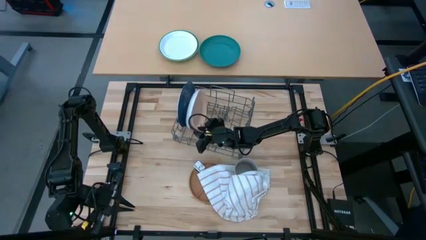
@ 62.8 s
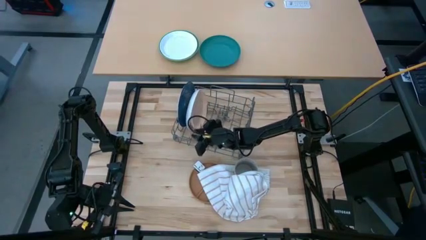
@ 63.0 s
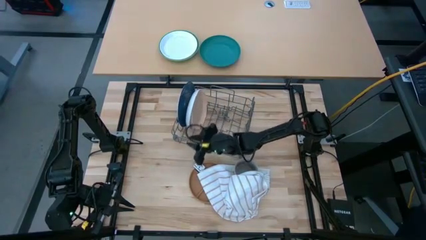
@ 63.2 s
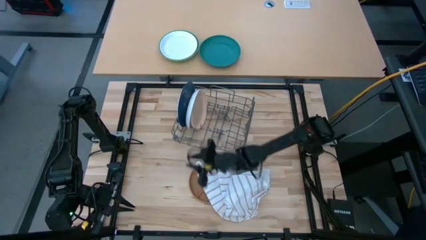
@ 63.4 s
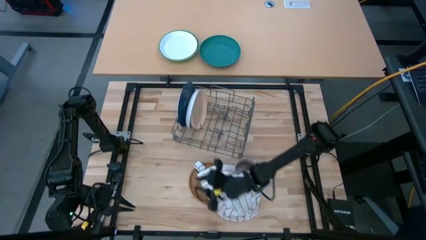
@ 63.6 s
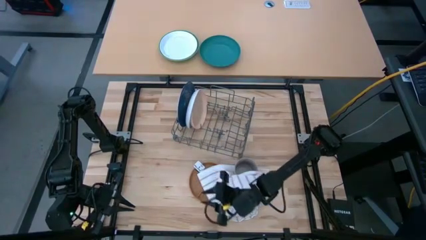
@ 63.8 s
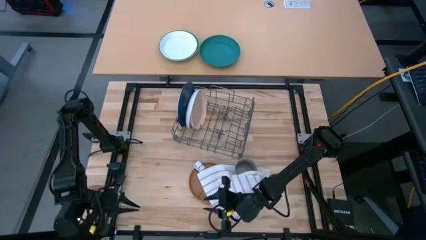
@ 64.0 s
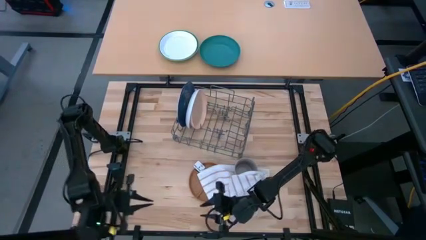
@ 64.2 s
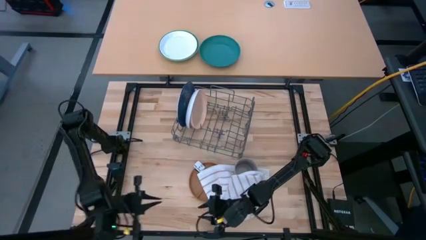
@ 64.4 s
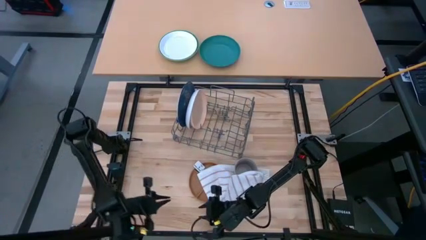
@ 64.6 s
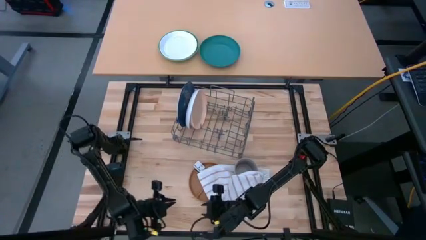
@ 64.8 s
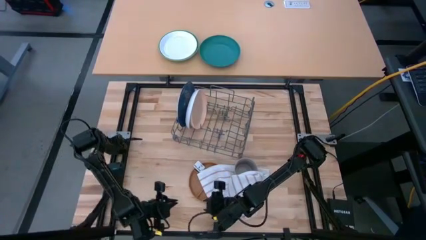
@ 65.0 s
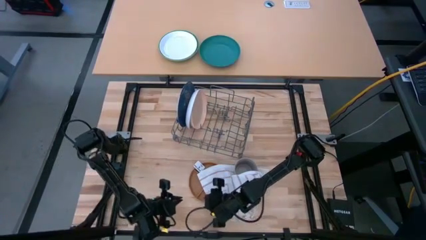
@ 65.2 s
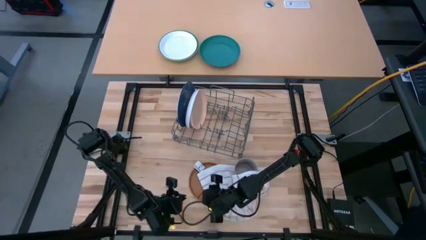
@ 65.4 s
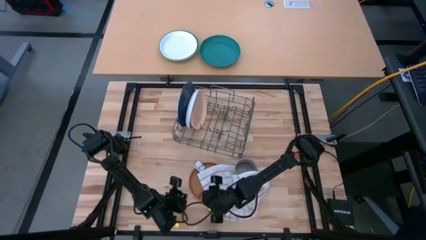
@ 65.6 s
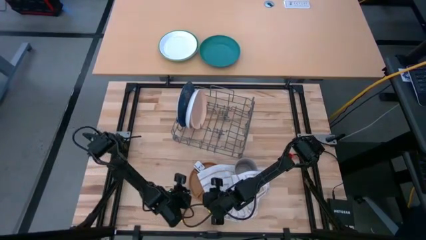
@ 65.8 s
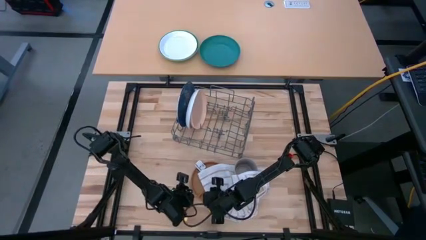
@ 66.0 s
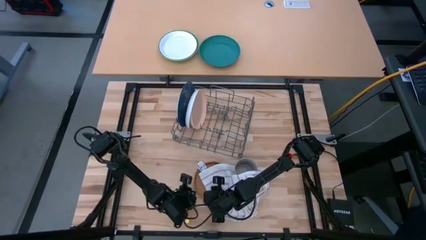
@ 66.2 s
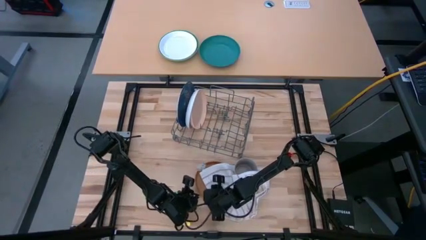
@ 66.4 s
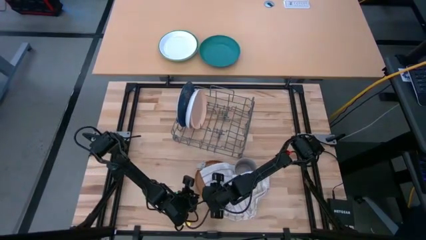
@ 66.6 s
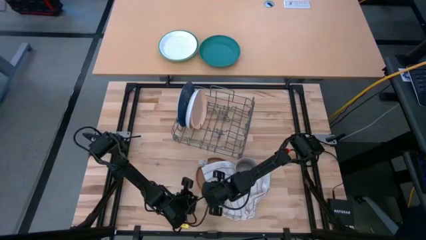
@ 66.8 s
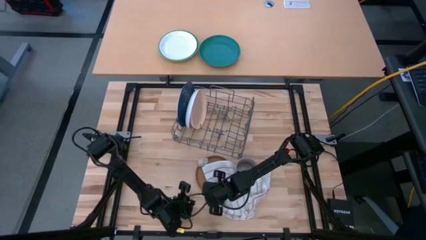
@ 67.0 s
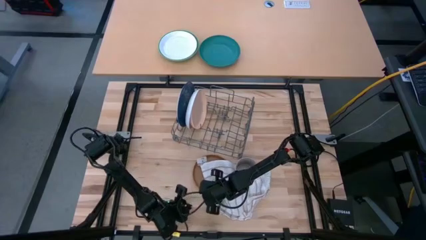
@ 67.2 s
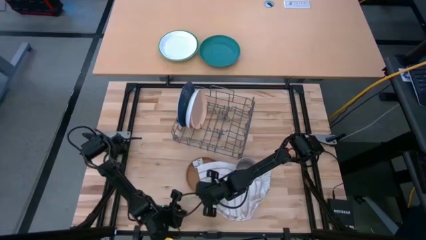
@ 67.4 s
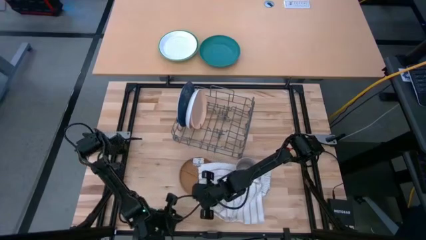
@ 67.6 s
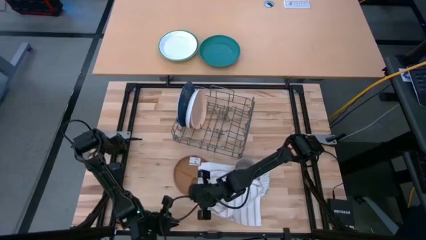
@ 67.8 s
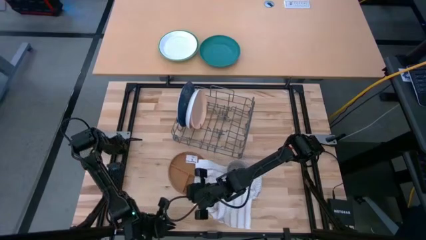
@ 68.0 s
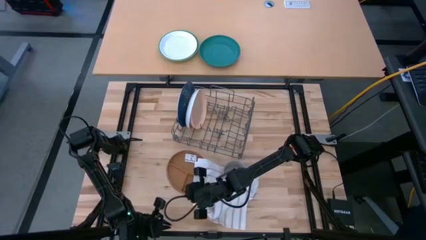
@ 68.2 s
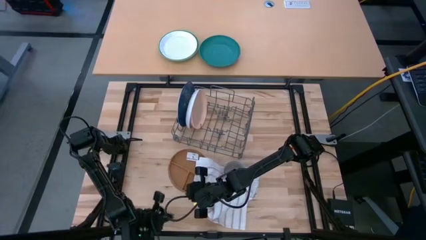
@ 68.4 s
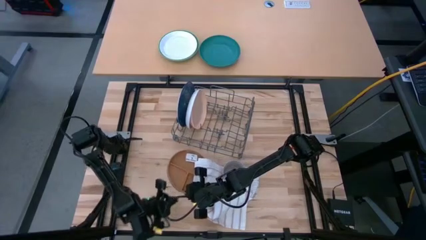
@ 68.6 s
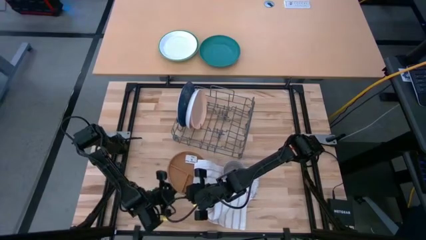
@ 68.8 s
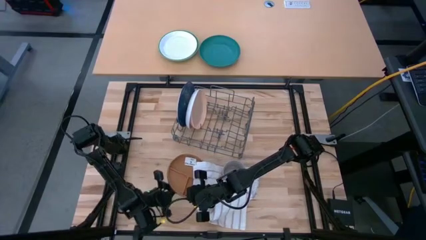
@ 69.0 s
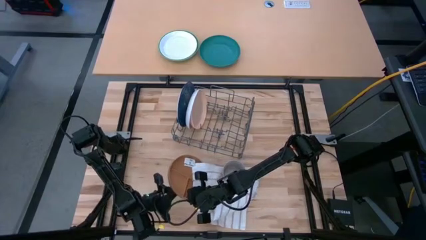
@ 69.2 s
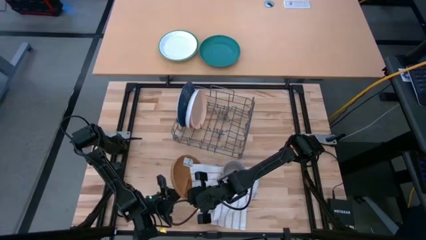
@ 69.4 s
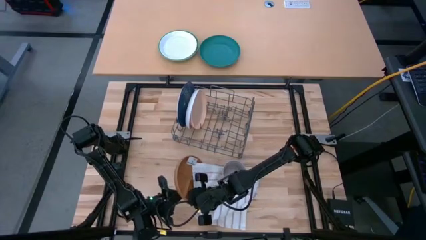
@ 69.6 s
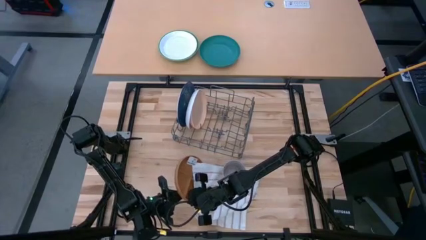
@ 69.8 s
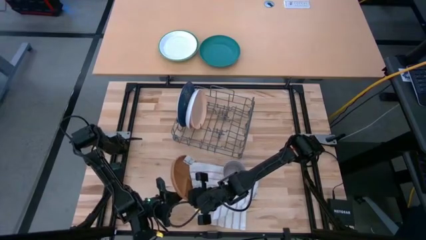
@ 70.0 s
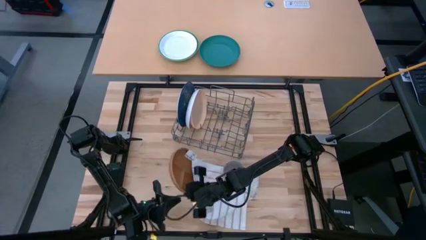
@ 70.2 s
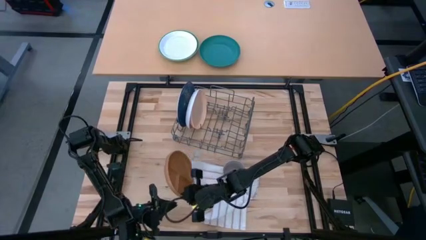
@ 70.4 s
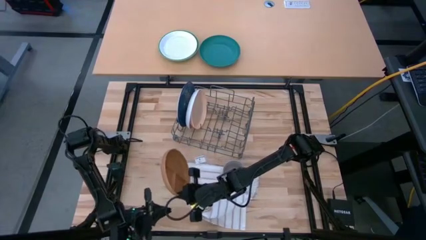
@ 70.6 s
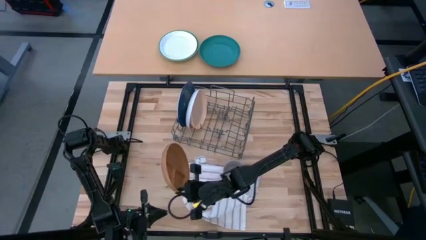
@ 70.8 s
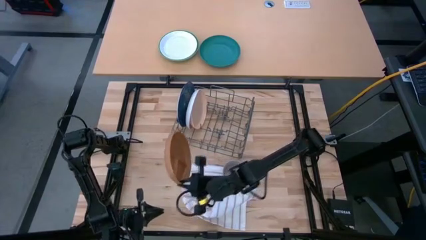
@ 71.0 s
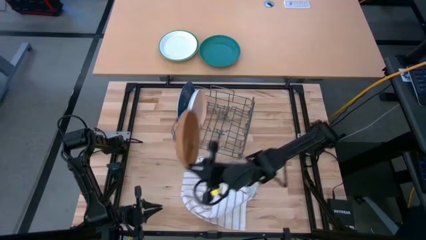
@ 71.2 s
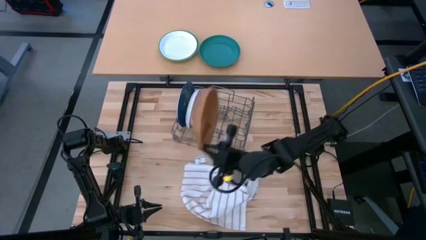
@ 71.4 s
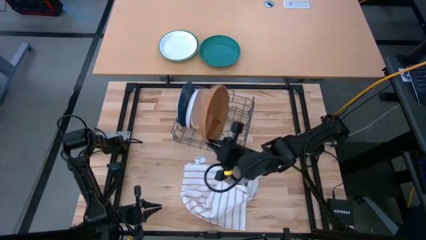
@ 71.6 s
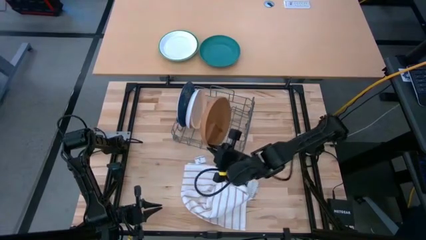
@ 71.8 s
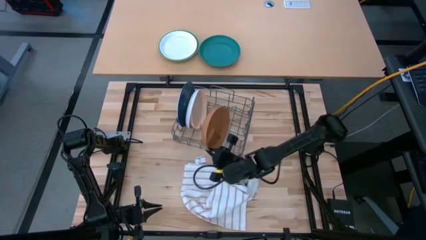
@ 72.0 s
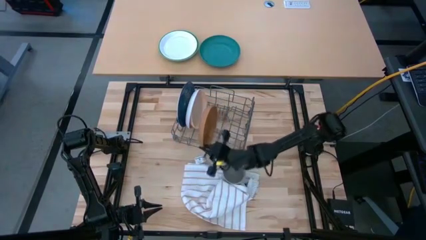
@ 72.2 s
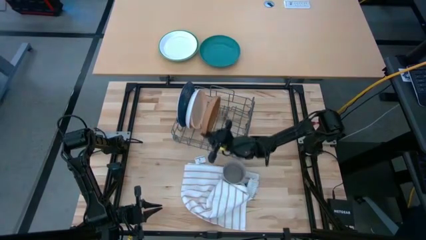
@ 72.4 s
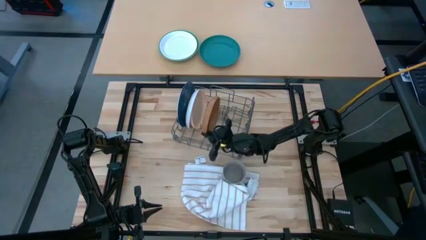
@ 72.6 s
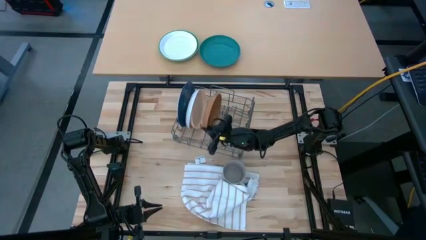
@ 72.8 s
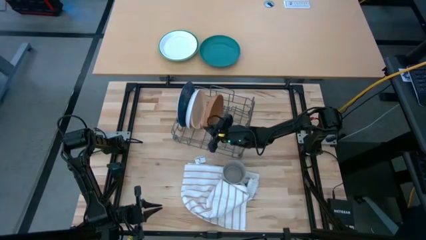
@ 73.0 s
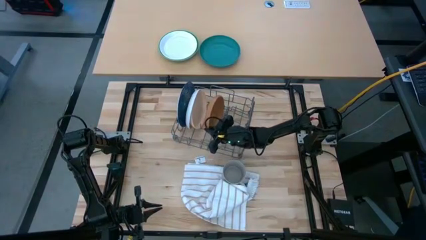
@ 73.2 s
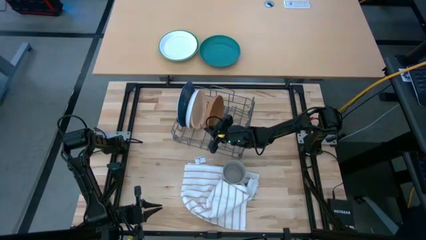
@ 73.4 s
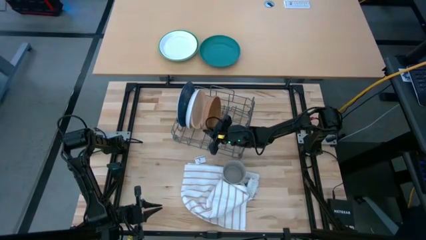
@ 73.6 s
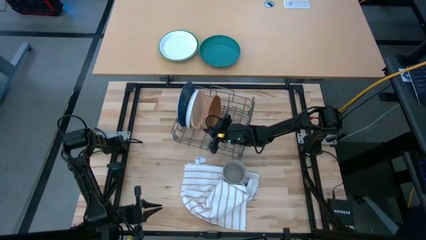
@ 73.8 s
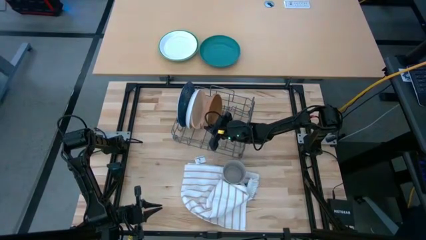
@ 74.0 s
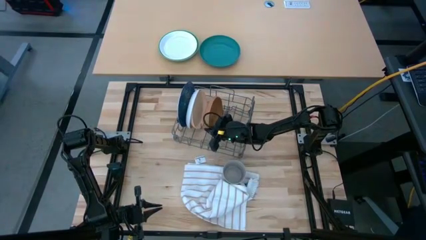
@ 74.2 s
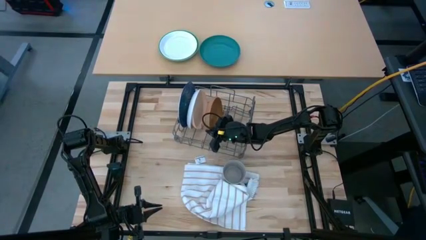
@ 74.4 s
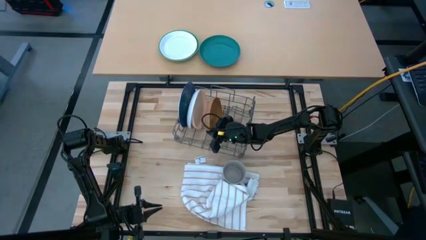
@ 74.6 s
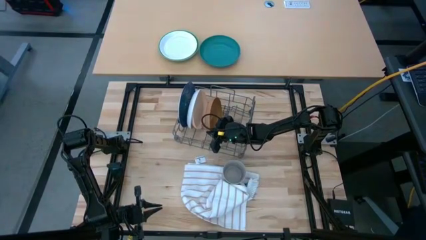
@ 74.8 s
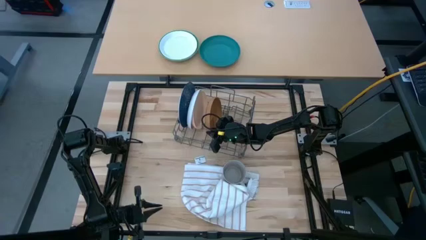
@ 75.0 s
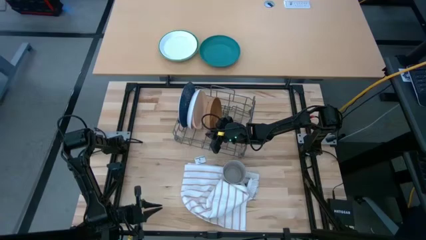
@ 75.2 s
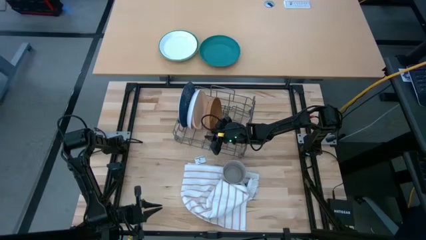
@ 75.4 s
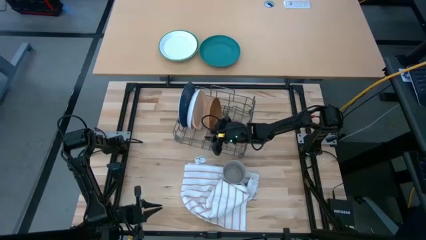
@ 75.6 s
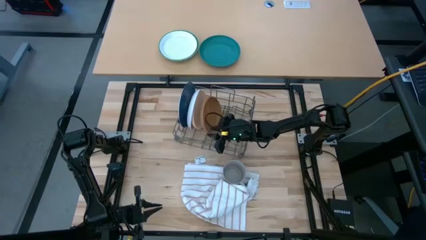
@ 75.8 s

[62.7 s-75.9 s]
Task: Sort dishes
Put the light brown plate into the dish rack

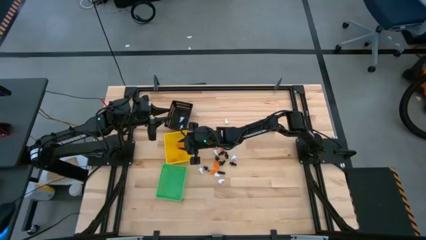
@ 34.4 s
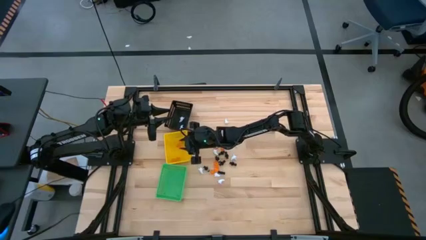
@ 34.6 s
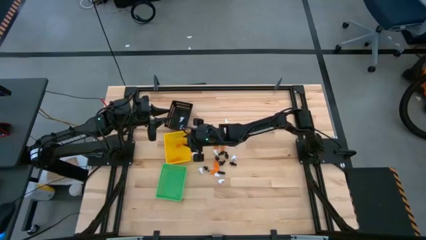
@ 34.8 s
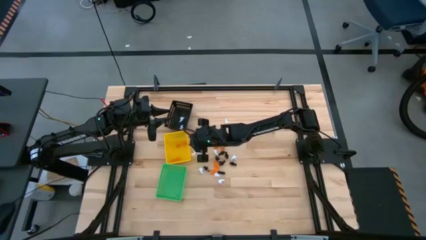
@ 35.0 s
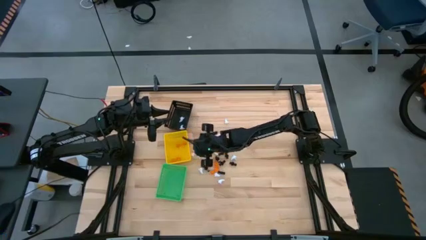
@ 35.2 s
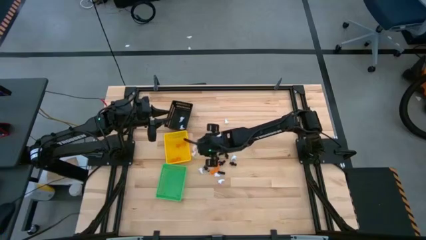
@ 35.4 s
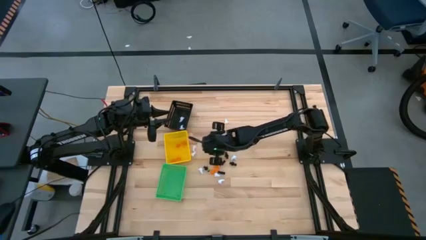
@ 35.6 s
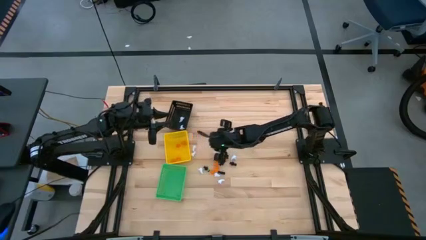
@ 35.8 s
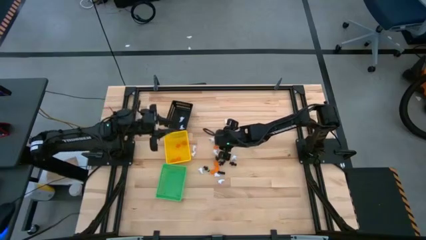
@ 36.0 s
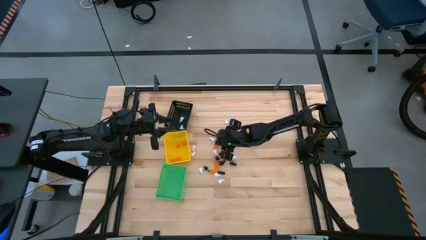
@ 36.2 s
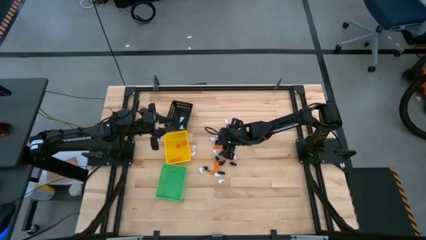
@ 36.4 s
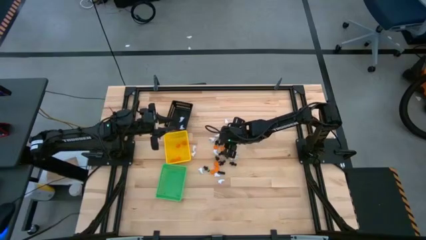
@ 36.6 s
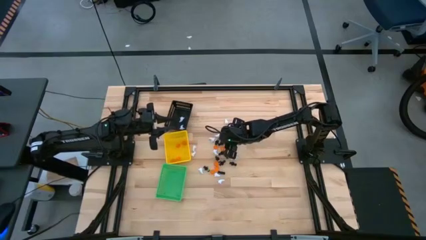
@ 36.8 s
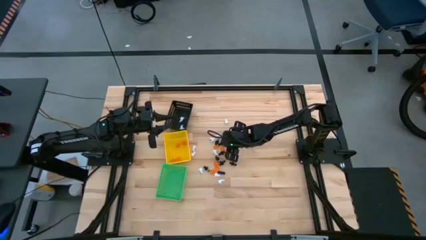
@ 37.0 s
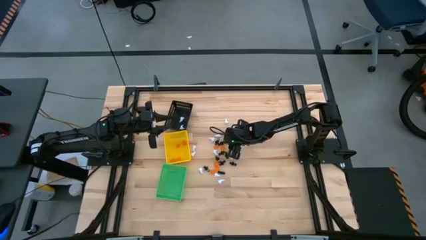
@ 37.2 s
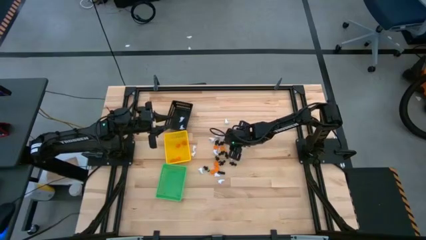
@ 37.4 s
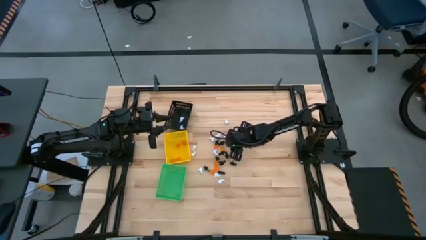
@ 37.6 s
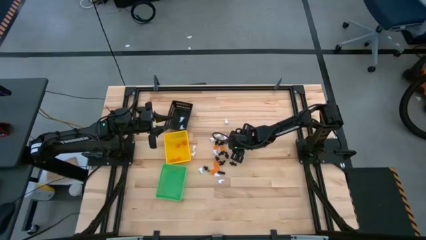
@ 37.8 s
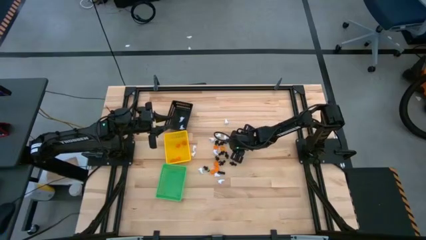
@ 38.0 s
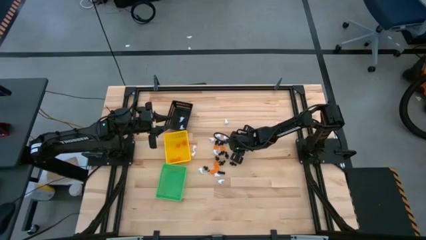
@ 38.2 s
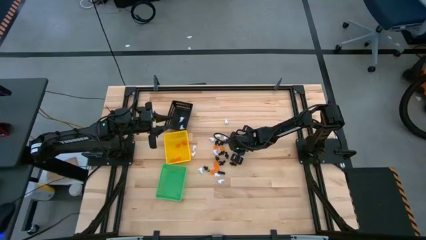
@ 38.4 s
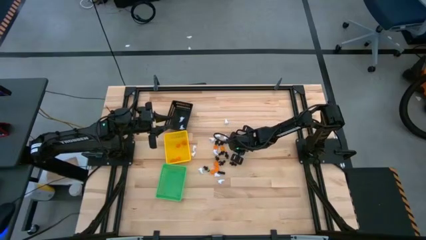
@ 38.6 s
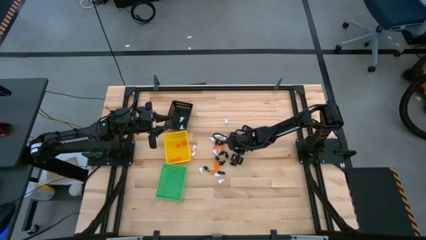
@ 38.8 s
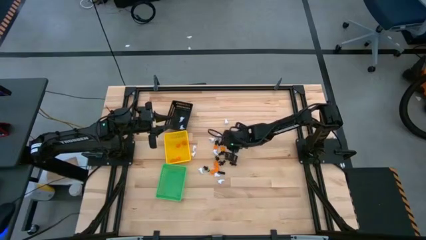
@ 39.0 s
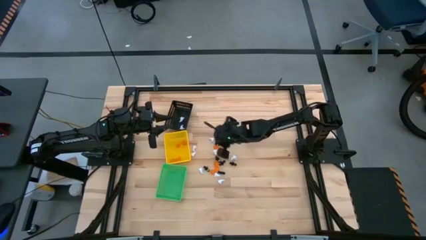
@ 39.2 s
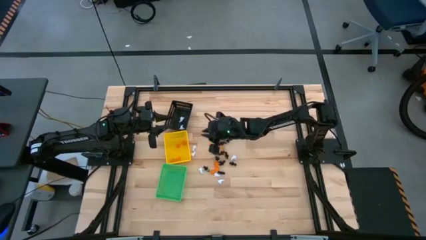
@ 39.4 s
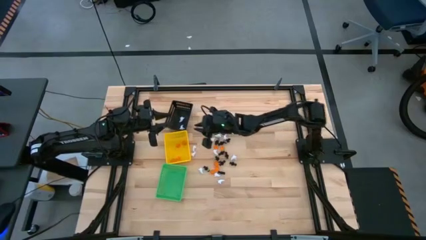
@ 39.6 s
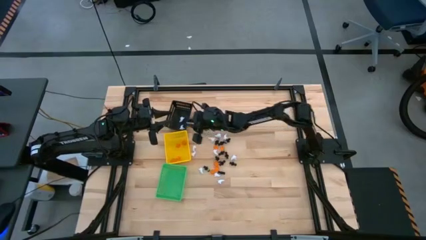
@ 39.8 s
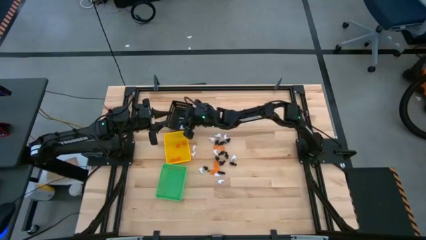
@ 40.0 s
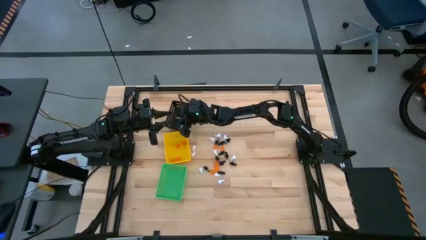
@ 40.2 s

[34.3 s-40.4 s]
Task: Sort Halloween decoration
Put the white ghost plush toy into the black basket
